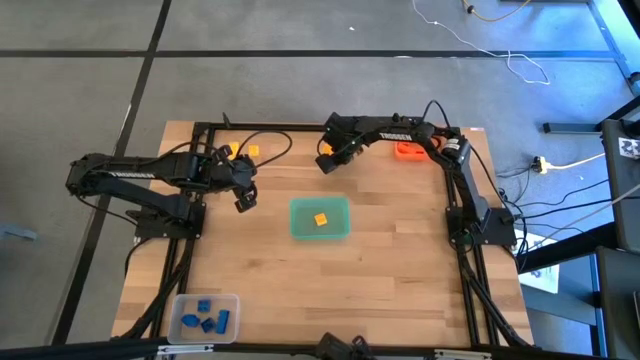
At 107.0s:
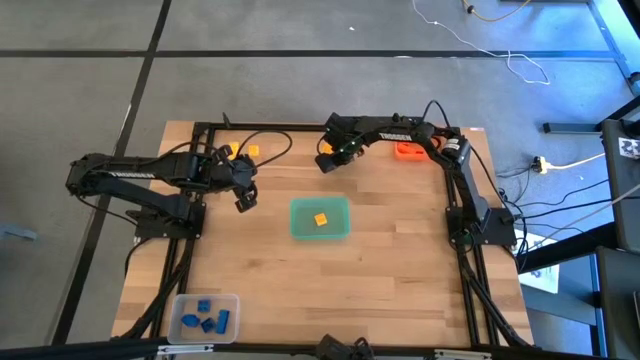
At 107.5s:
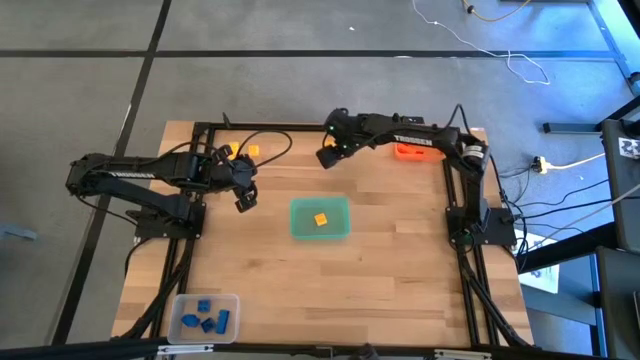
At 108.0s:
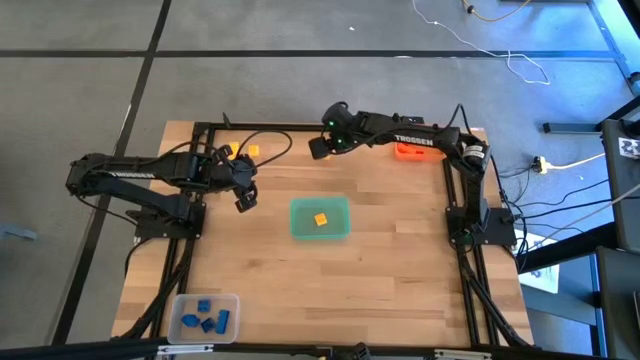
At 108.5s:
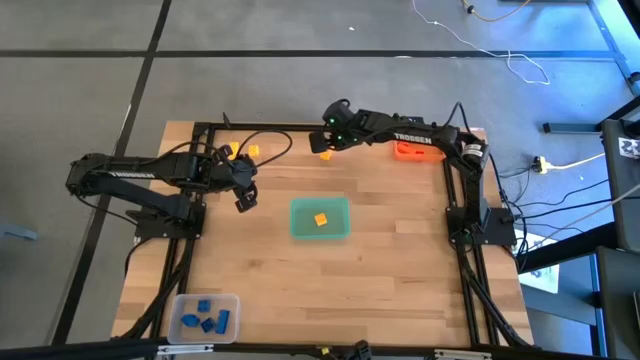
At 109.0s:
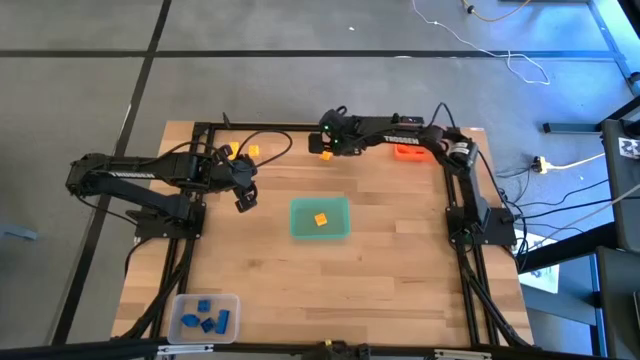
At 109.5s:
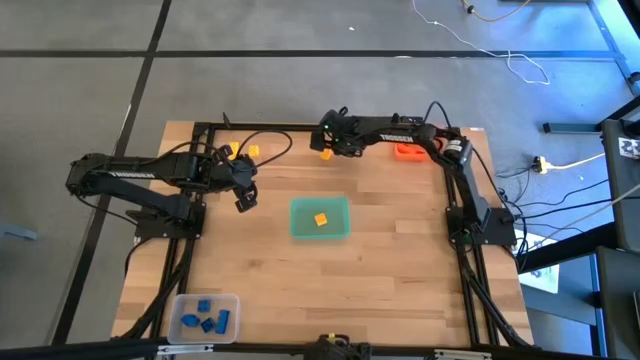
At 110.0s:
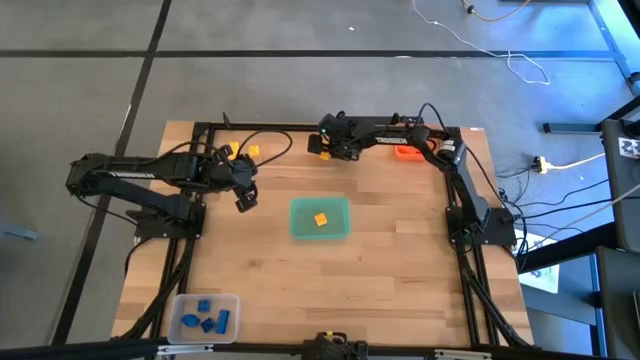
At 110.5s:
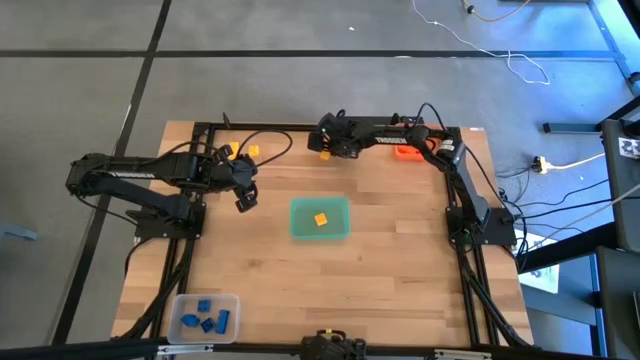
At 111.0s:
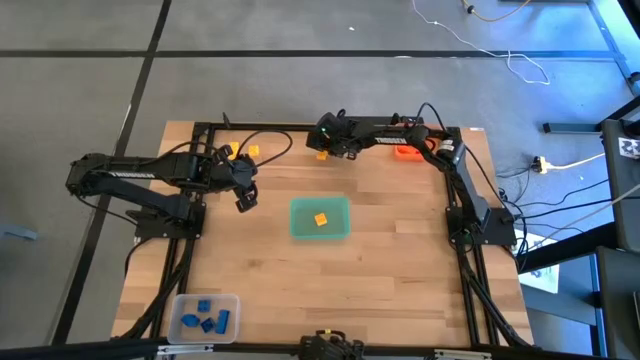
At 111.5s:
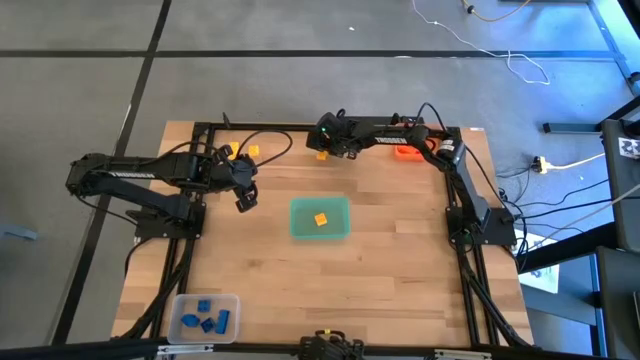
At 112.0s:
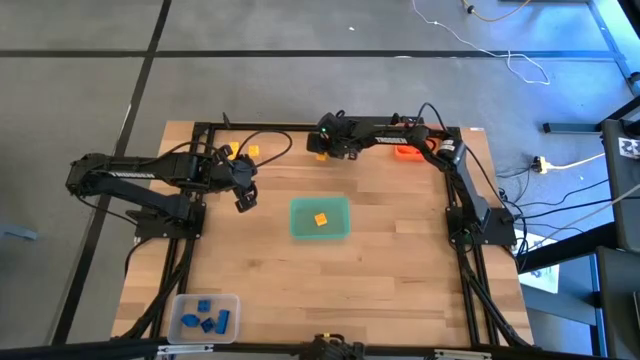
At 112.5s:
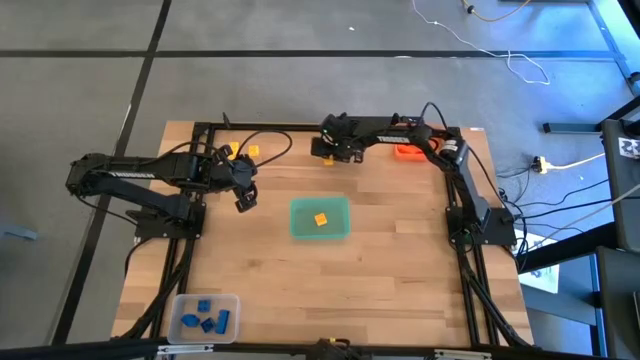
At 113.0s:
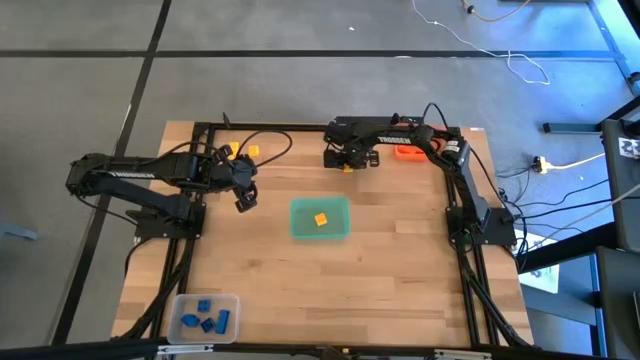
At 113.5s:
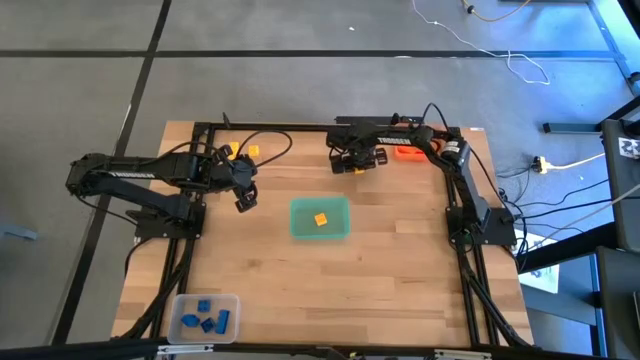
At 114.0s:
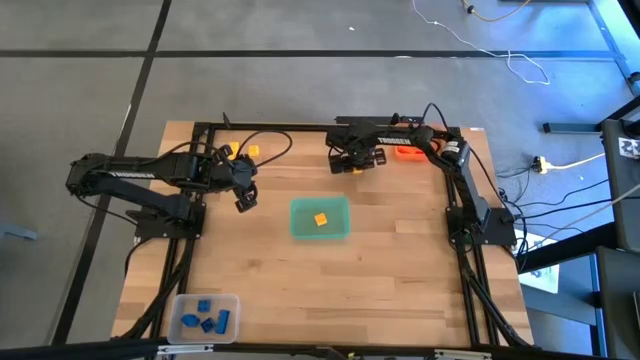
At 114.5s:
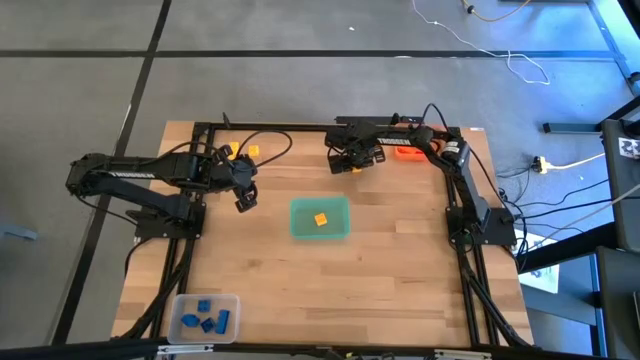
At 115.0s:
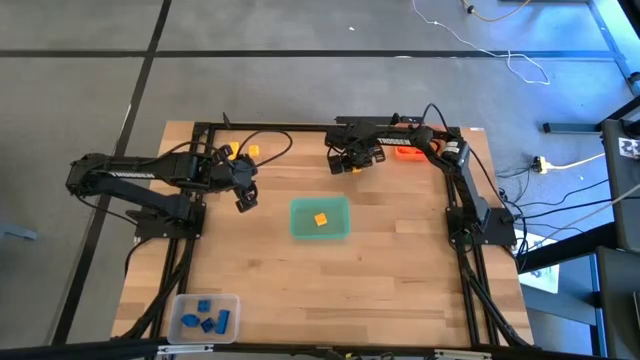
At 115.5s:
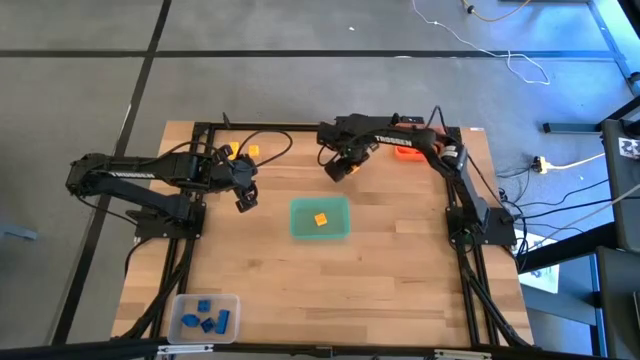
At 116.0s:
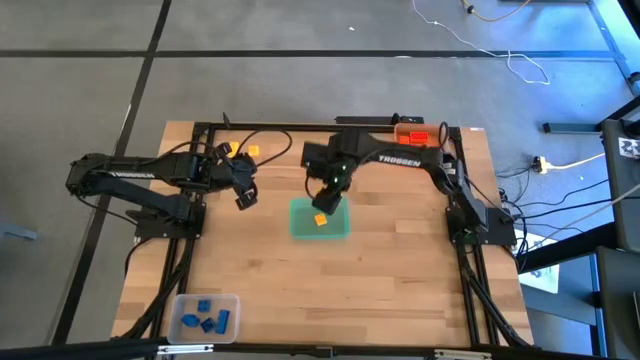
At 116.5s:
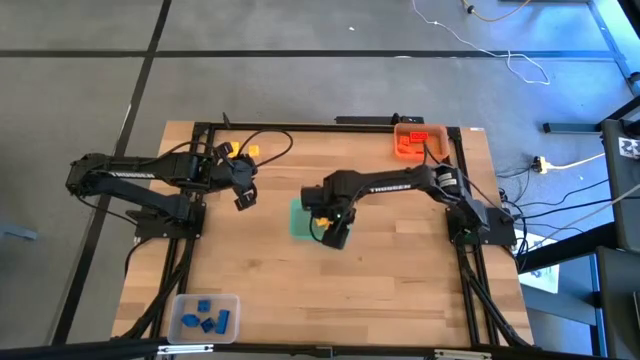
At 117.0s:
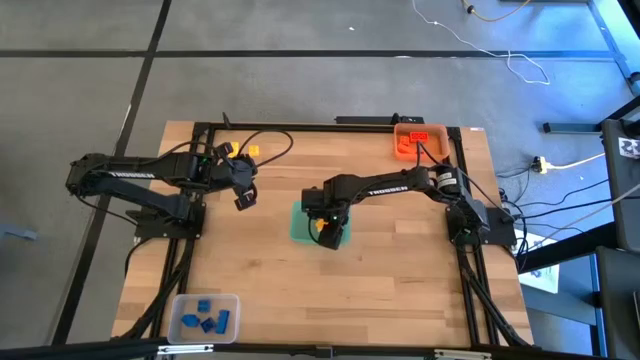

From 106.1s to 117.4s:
Task: Sort & place blocks by color
Put the yellow game piece into the blue bin

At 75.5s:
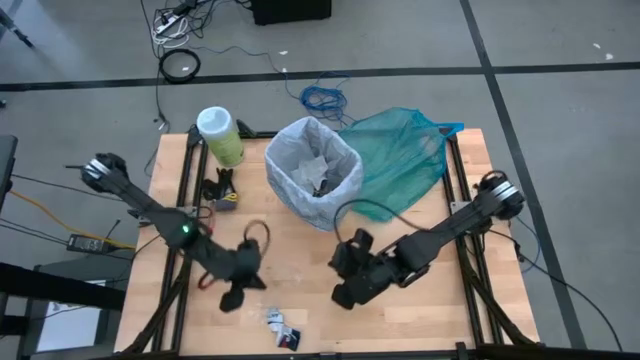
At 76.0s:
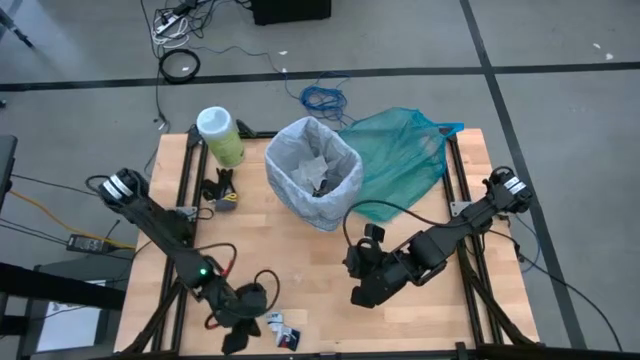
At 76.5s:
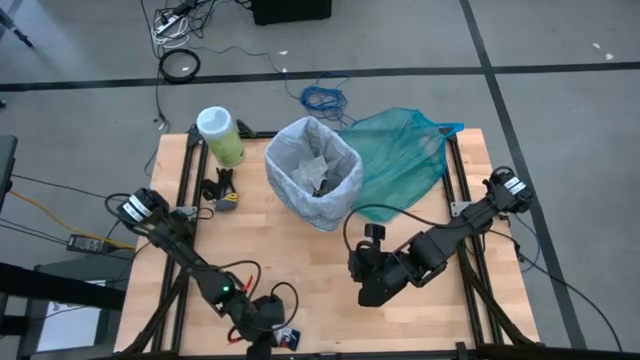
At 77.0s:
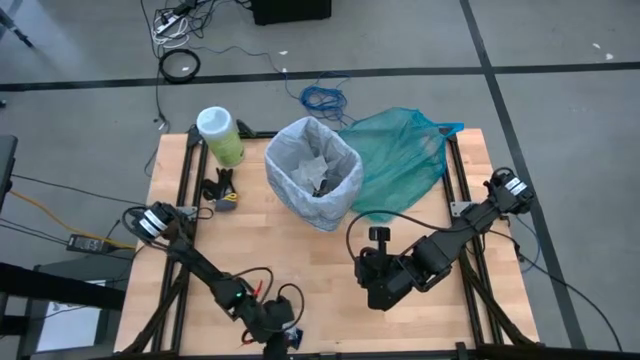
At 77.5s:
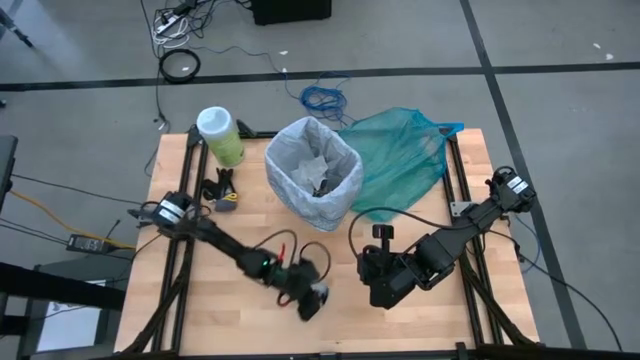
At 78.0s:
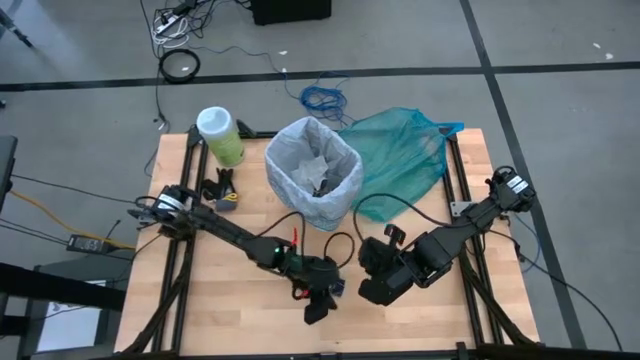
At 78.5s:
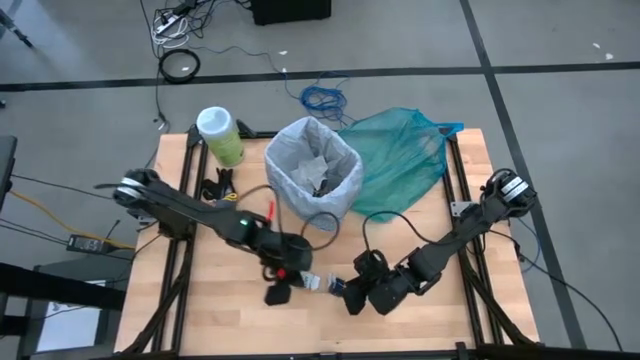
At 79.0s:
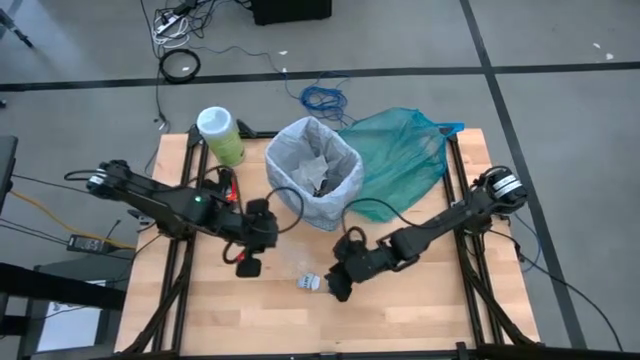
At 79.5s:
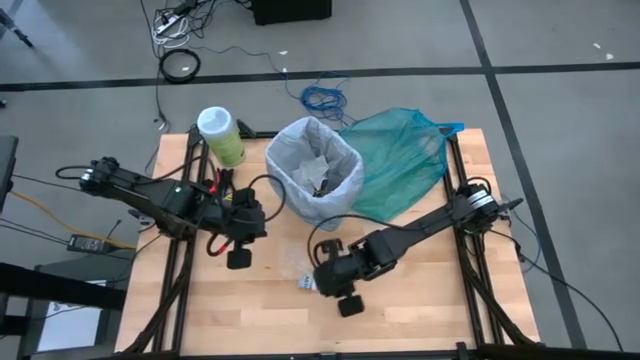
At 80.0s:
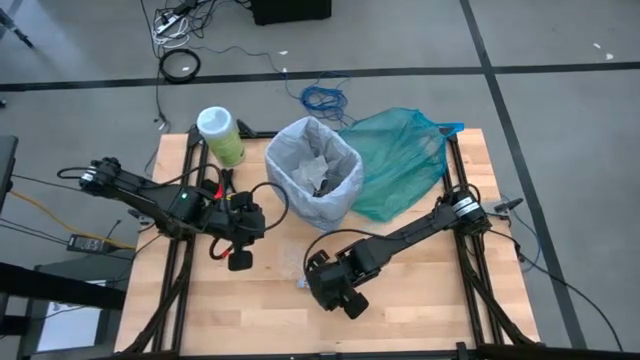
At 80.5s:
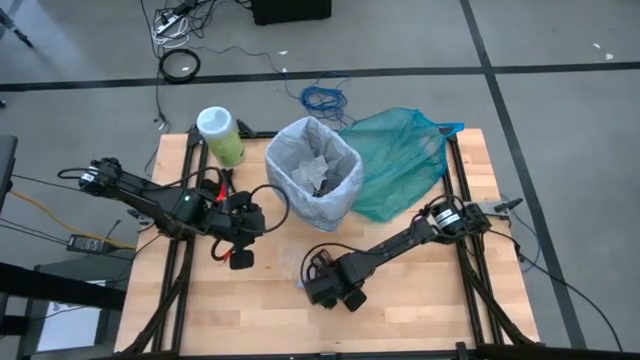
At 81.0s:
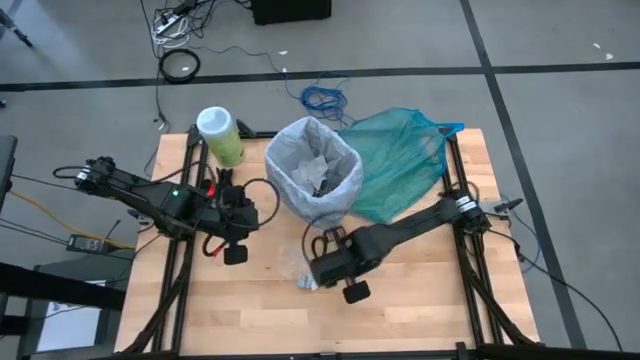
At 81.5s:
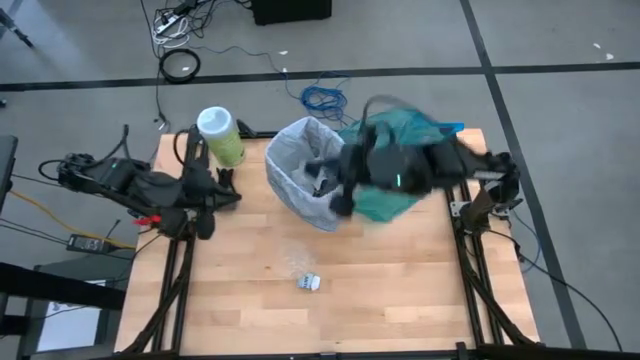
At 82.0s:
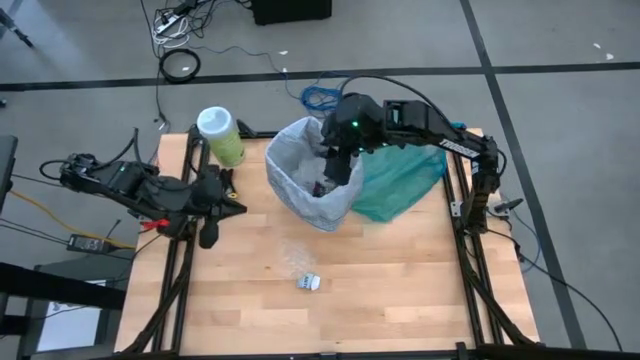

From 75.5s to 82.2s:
Task: place trash/remove bag and relplace
Put the dark blue paper into the trash bin

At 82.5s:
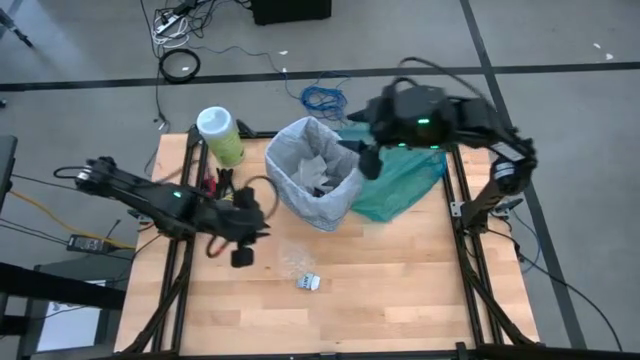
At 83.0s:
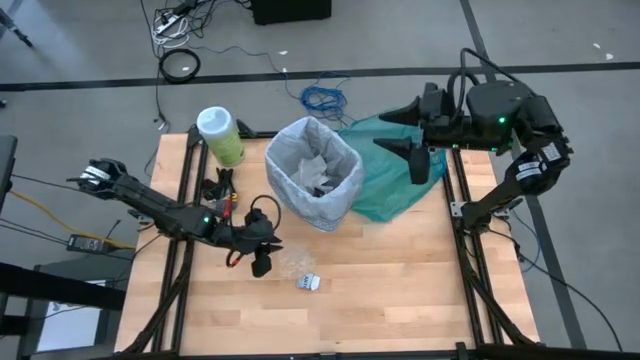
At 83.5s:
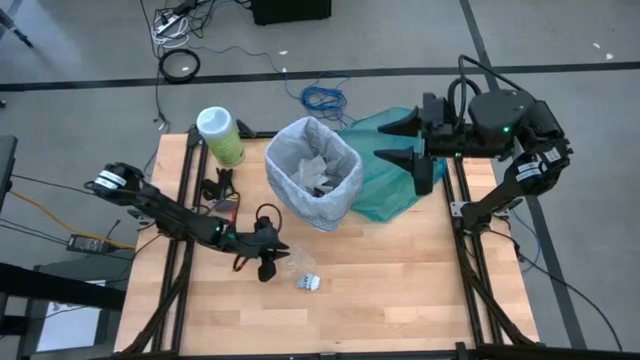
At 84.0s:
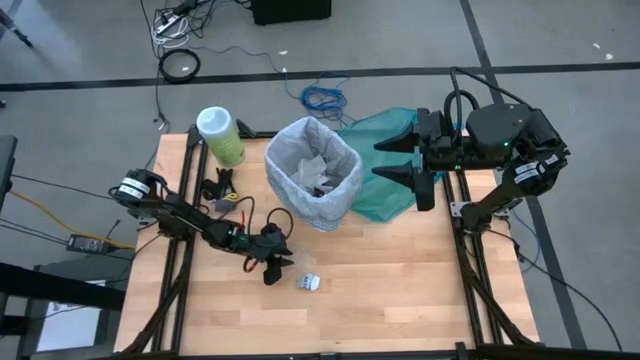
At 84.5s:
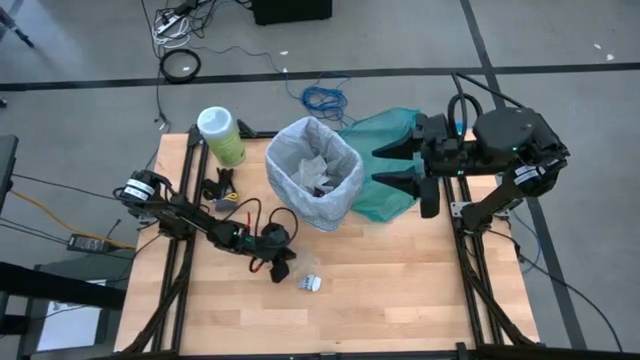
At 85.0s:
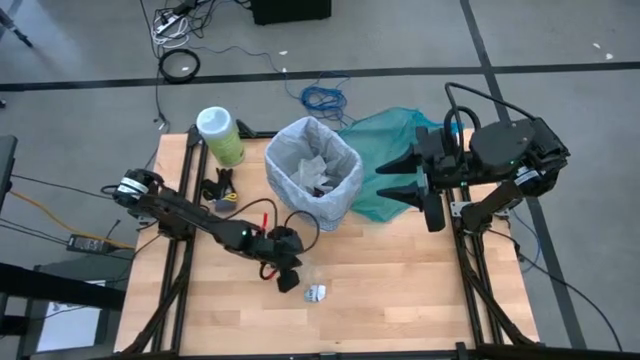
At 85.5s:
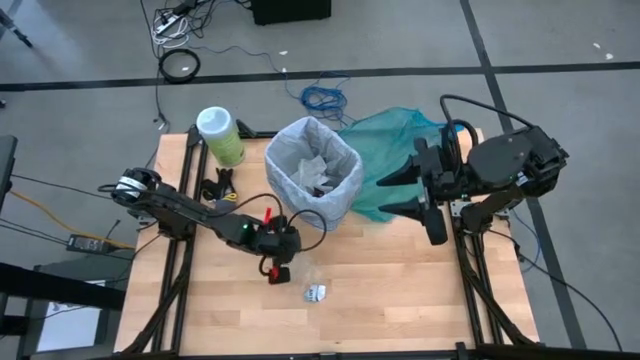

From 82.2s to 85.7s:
Put the transparent plastic into the trash bin

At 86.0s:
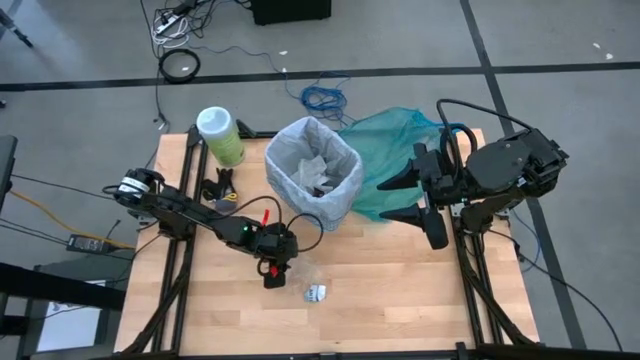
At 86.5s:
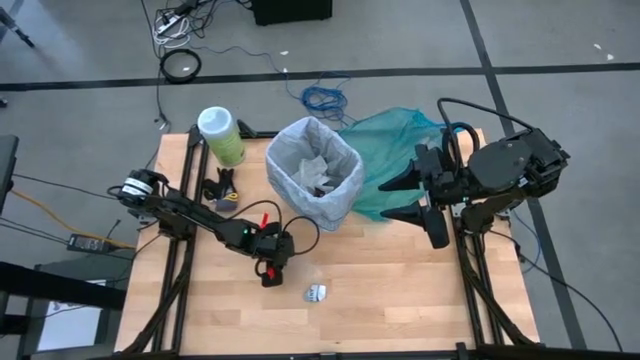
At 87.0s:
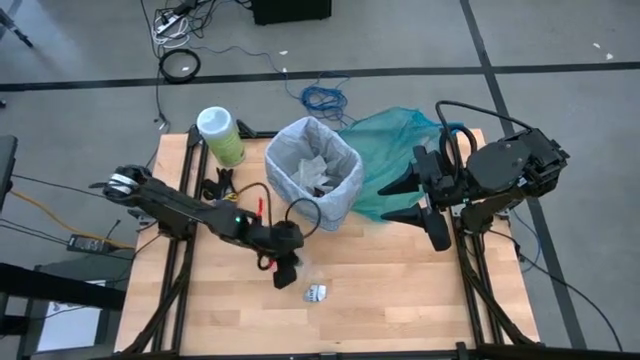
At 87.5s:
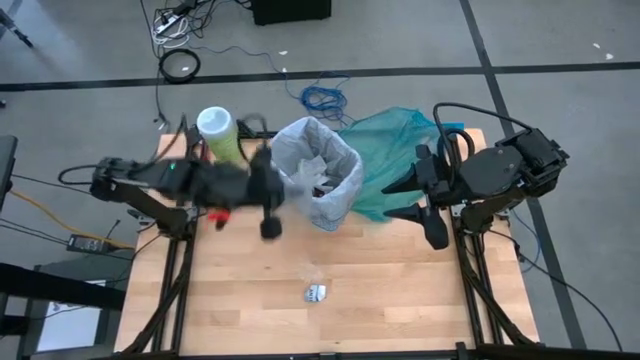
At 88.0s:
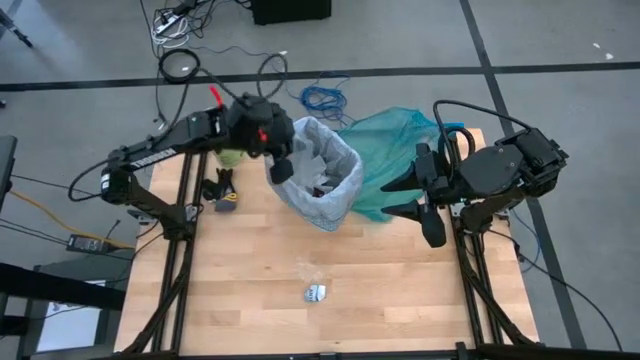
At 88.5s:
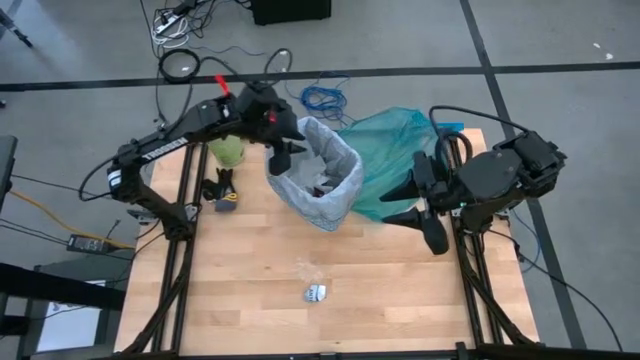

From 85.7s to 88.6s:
Put the transparent plastic into the trash bin
